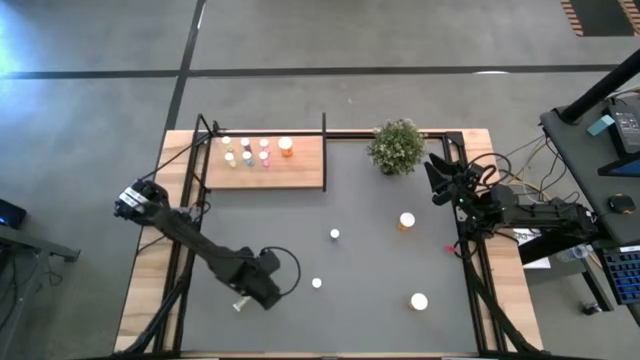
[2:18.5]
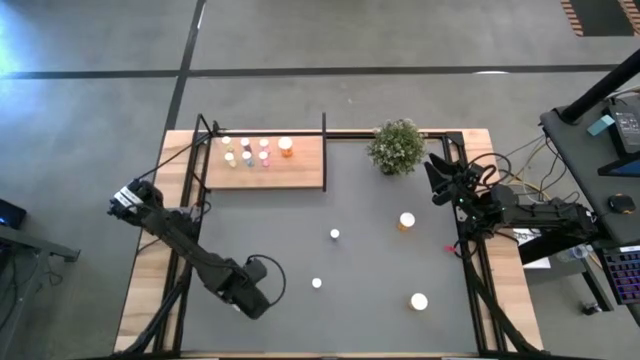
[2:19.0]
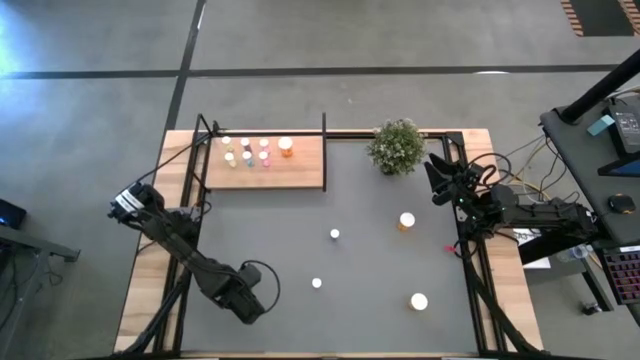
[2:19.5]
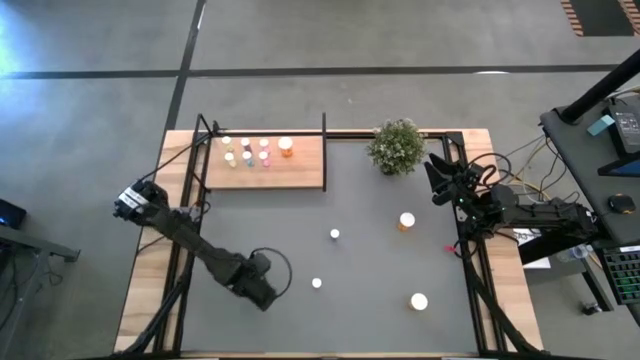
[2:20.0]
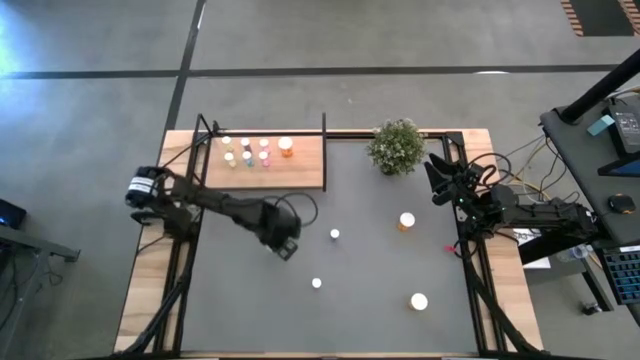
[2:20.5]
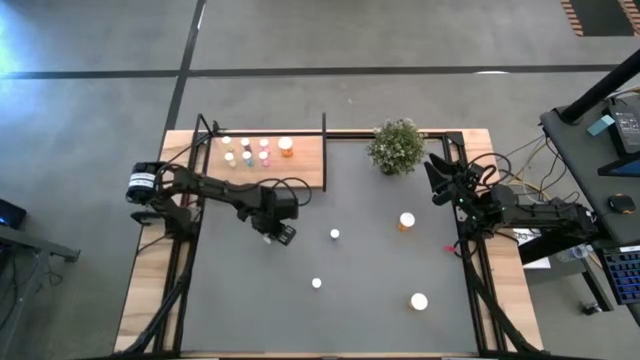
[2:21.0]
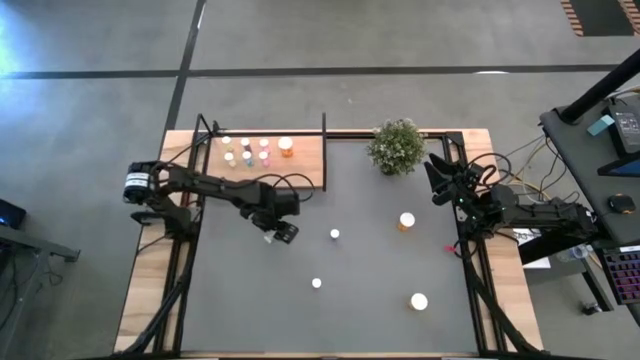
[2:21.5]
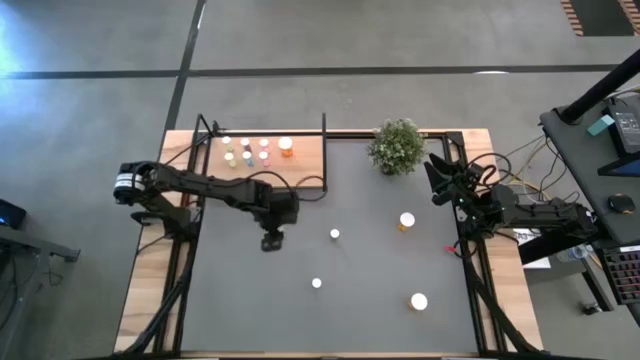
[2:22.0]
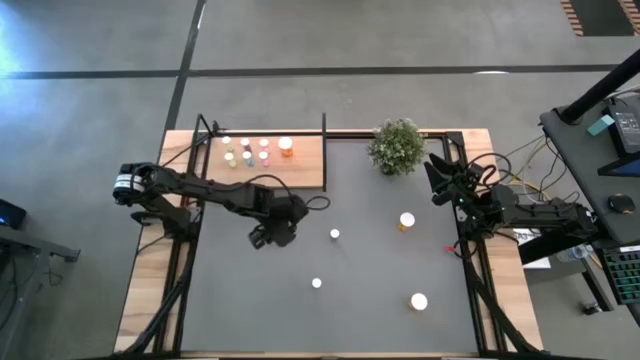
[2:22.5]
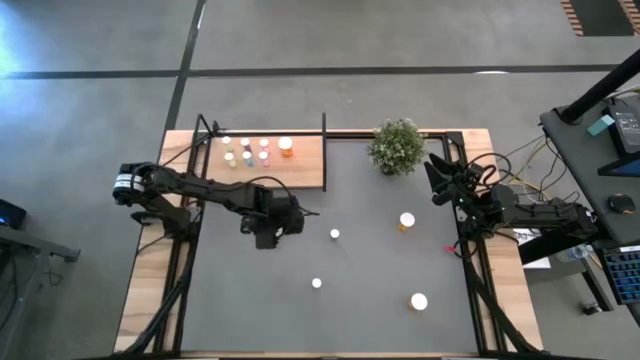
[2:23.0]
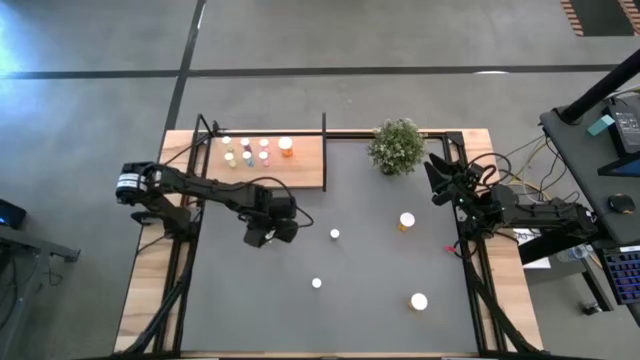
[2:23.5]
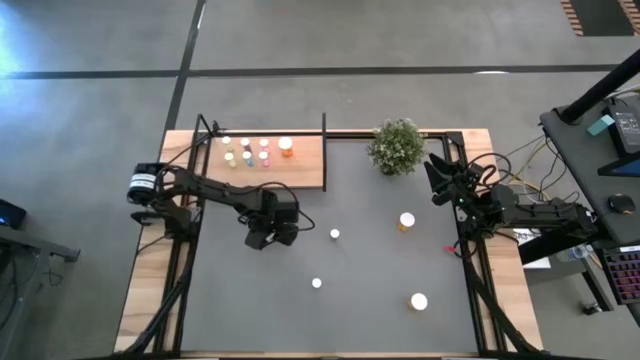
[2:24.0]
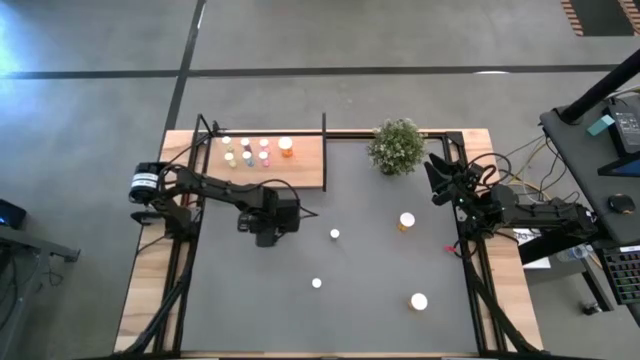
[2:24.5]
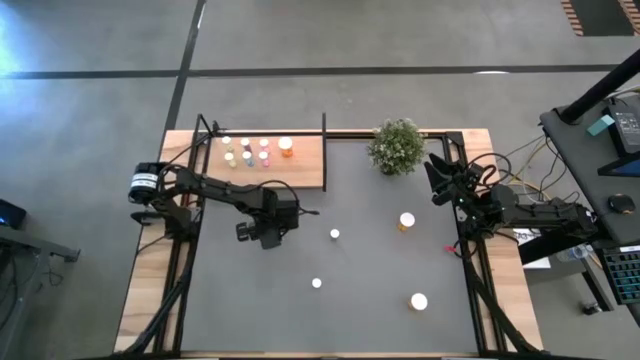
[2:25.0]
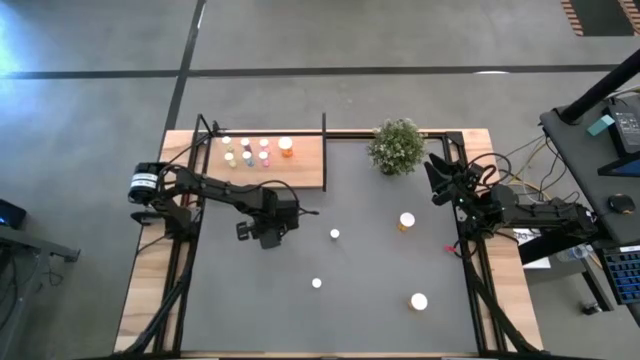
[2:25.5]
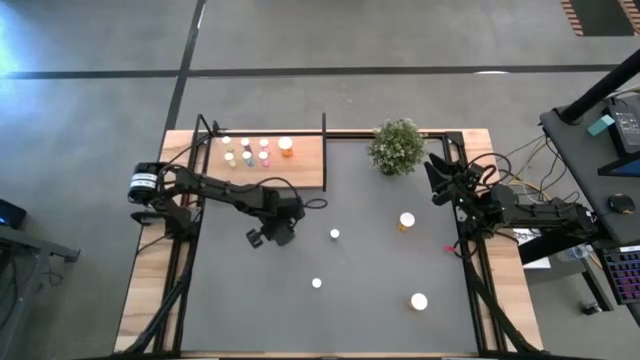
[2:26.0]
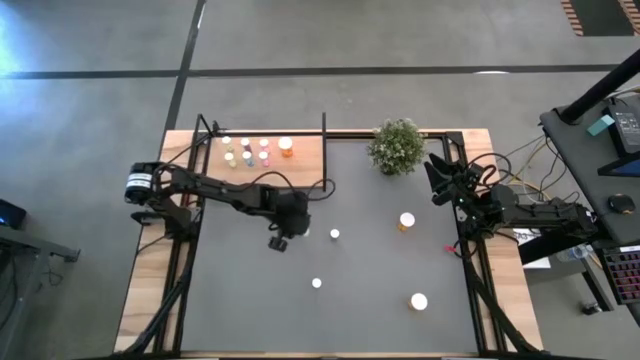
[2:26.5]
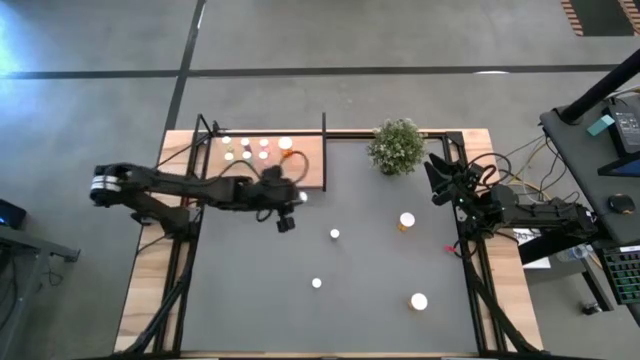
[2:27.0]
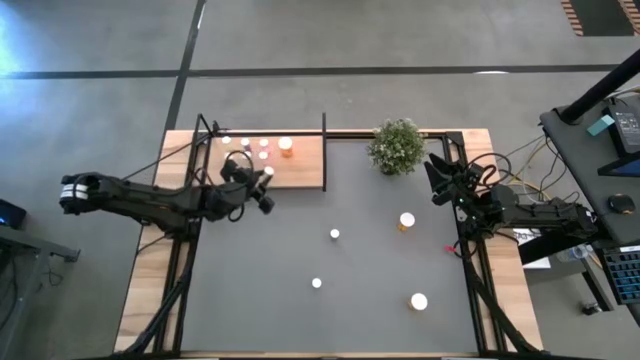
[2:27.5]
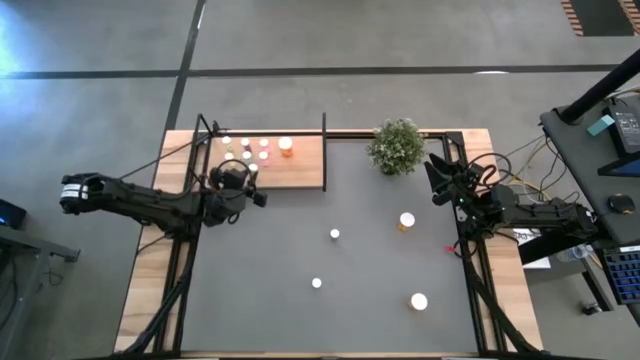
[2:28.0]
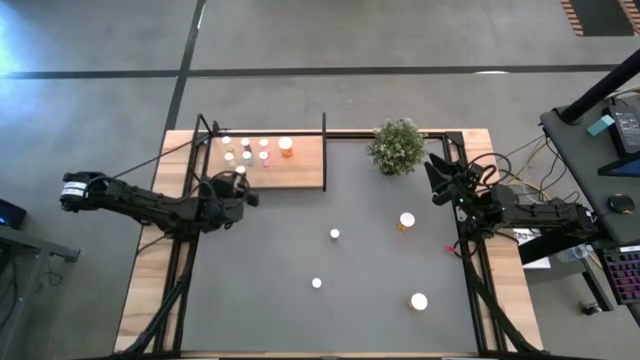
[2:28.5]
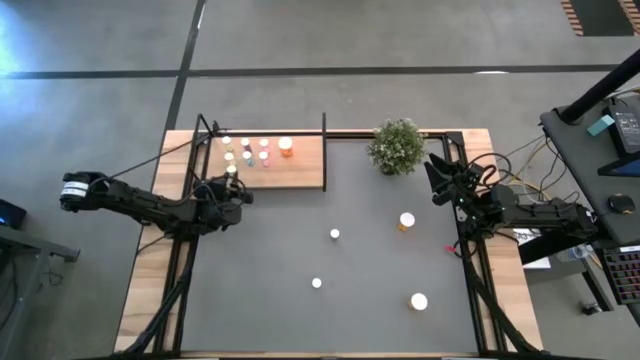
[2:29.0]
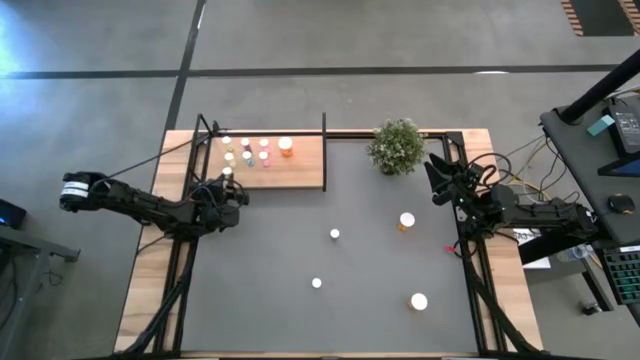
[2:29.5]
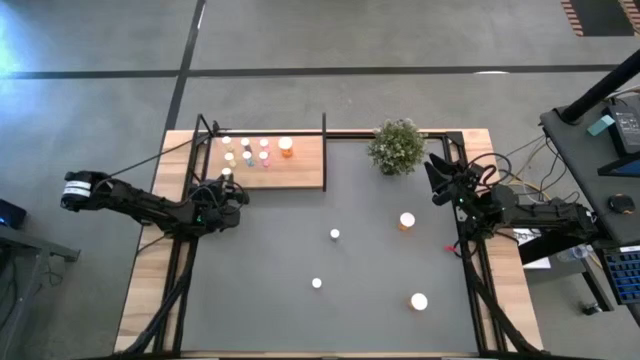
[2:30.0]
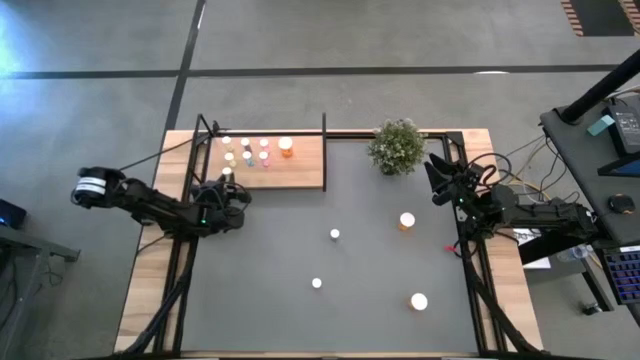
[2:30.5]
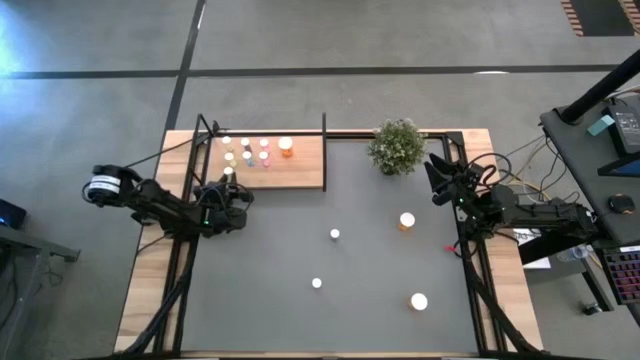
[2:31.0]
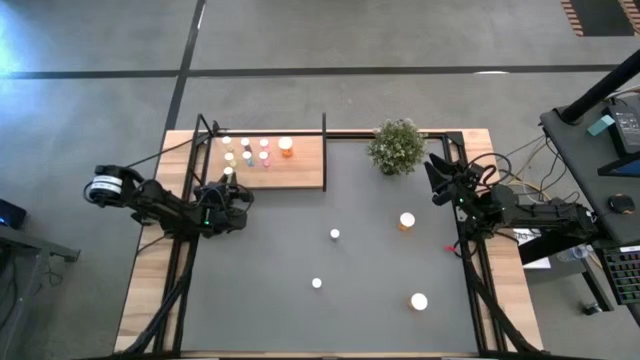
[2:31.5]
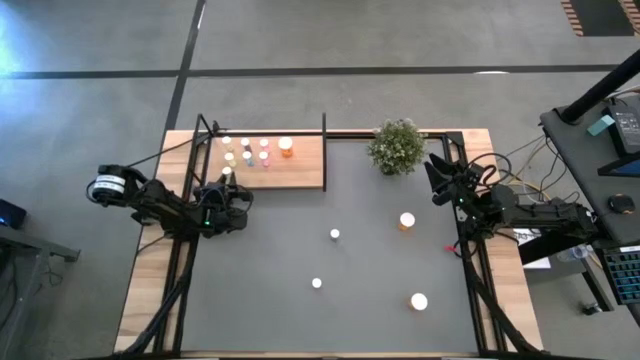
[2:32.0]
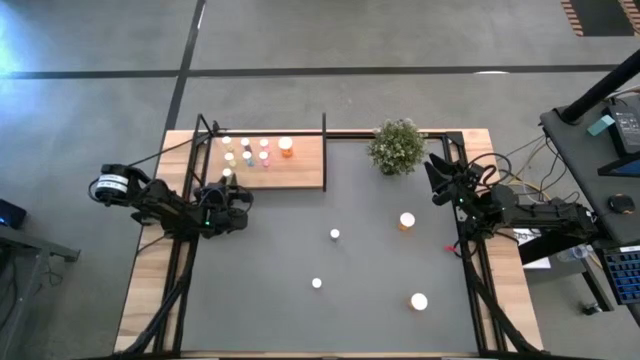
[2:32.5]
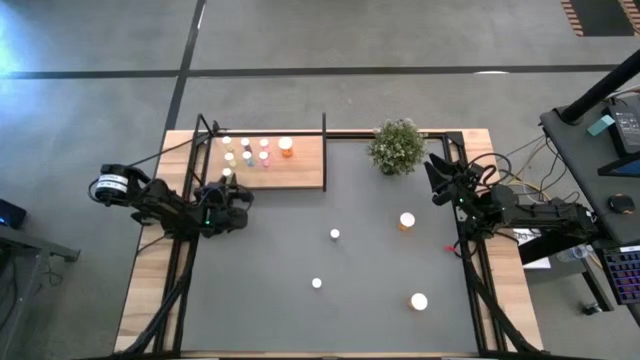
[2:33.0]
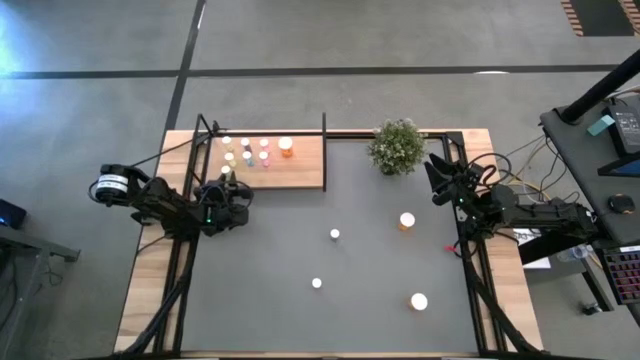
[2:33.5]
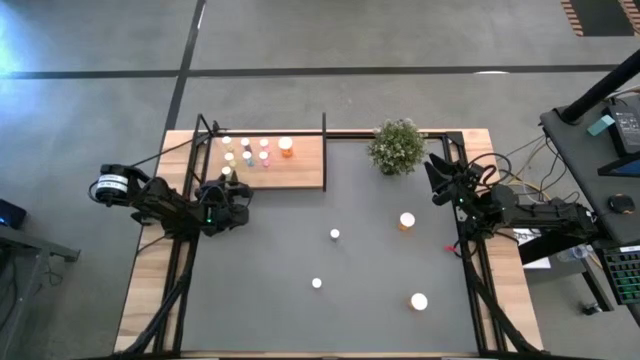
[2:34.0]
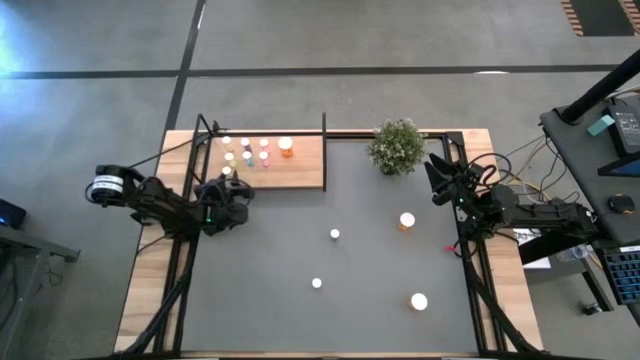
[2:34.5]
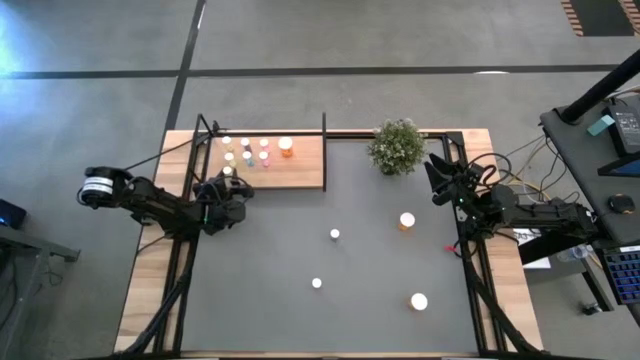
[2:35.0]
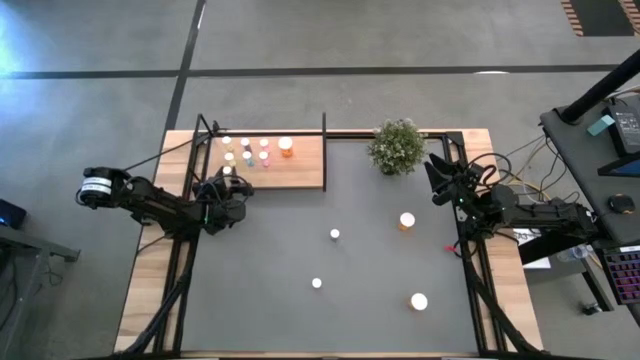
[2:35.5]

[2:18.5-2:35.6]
Task: Pick and place medicine bottles onto shelf by color
Put the yellow pill bottle on the shelf aligned with the other yellow pill bottles
